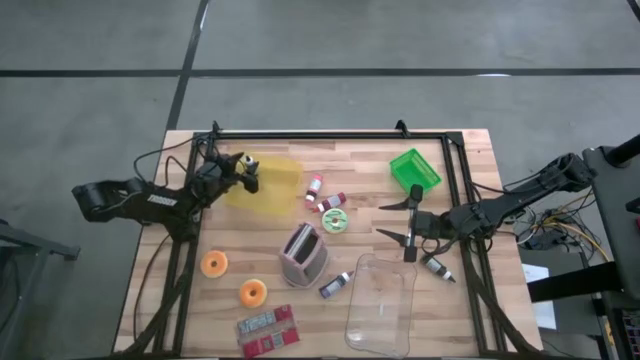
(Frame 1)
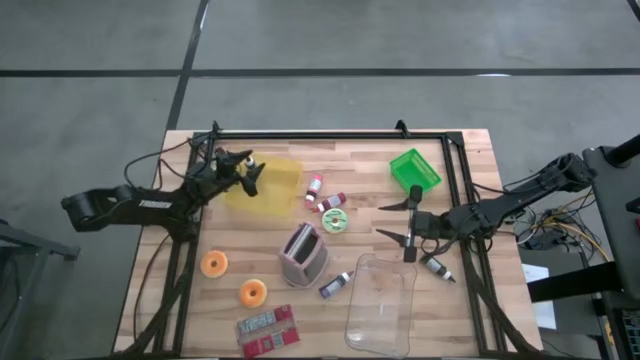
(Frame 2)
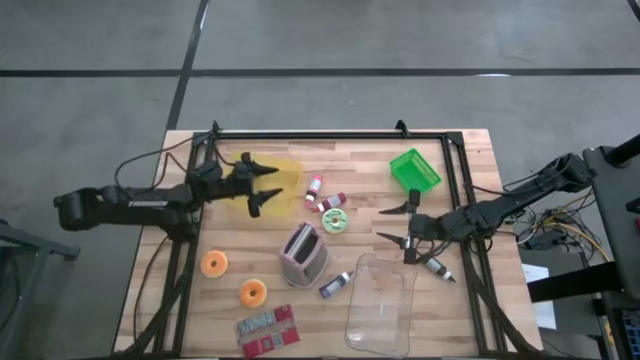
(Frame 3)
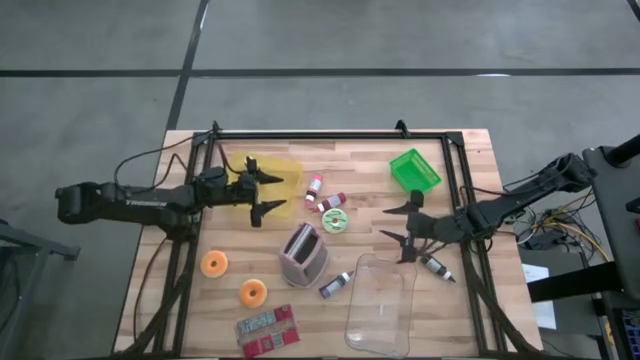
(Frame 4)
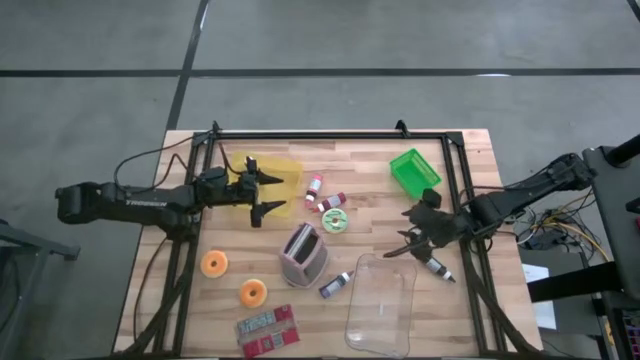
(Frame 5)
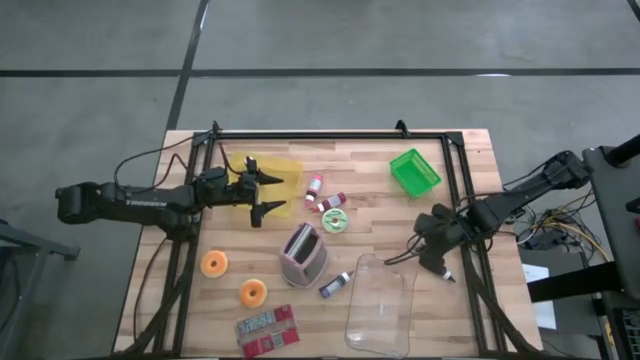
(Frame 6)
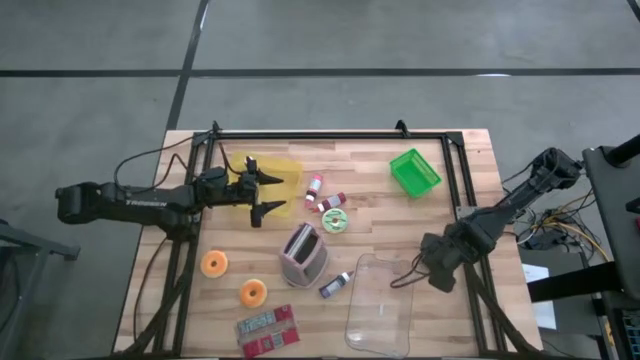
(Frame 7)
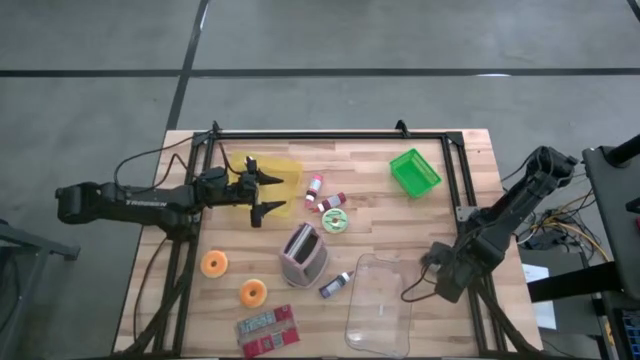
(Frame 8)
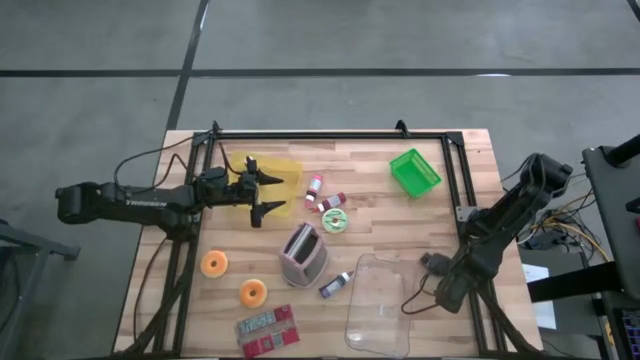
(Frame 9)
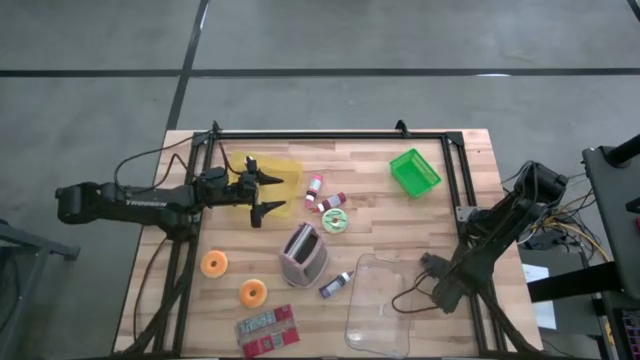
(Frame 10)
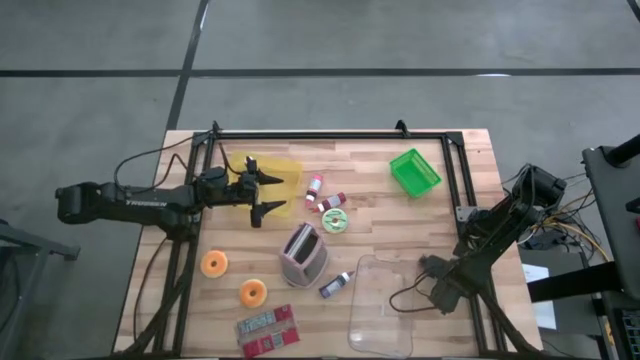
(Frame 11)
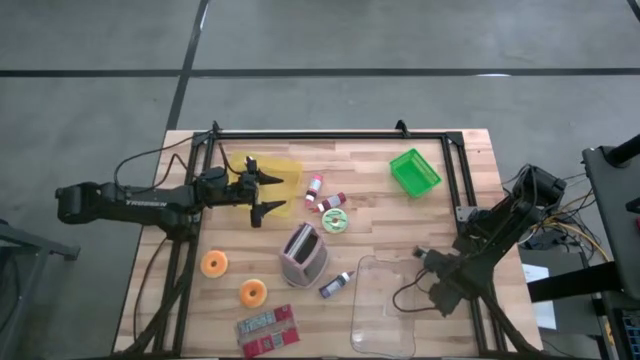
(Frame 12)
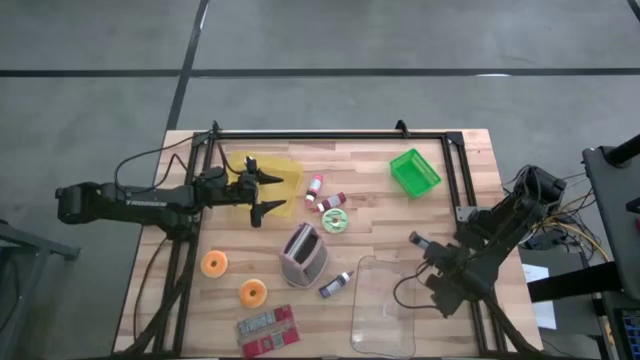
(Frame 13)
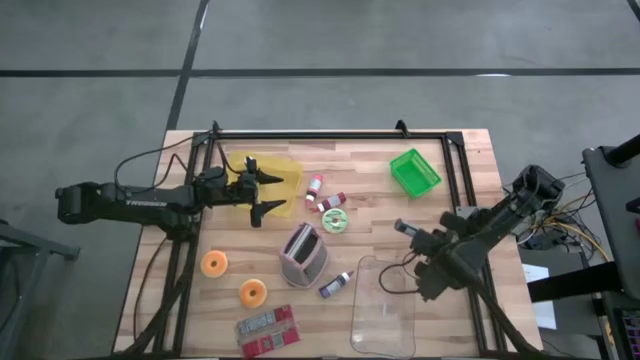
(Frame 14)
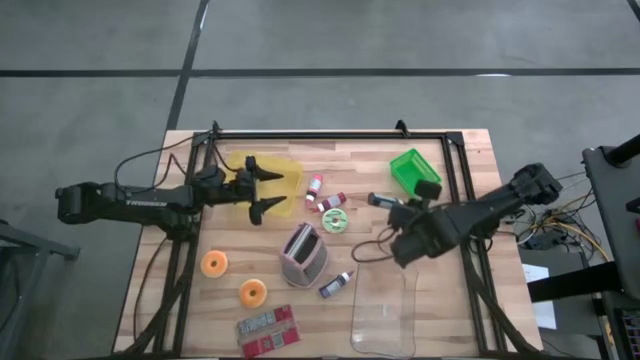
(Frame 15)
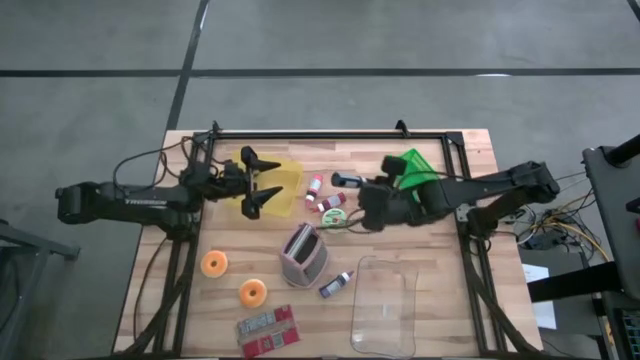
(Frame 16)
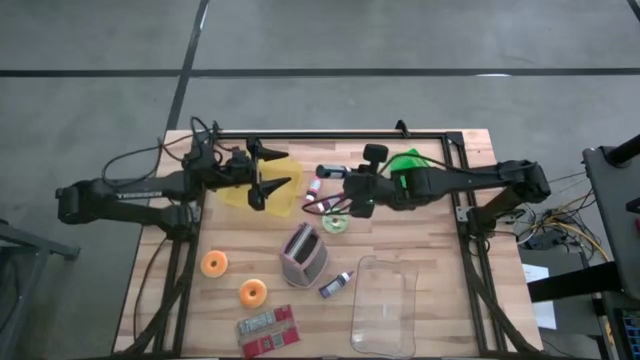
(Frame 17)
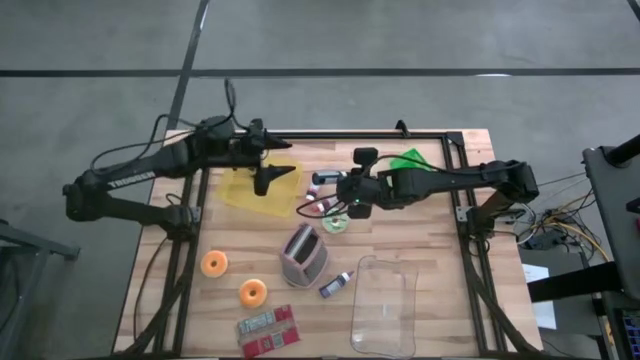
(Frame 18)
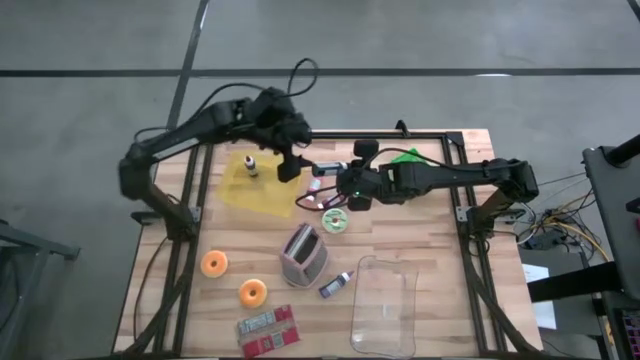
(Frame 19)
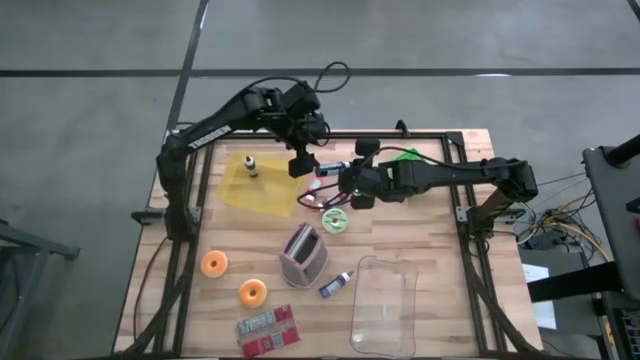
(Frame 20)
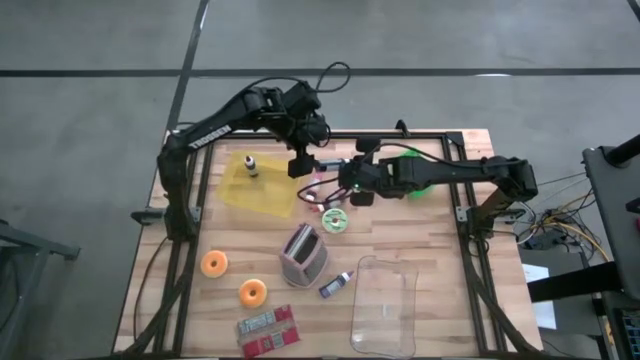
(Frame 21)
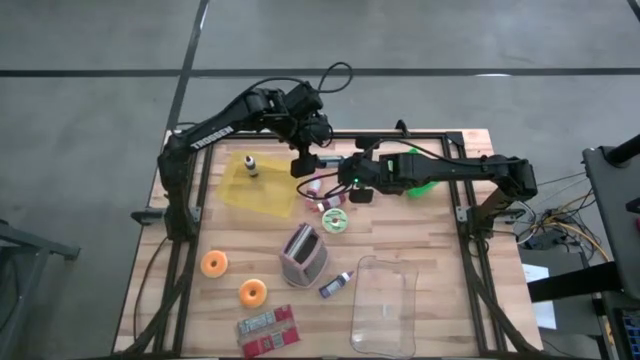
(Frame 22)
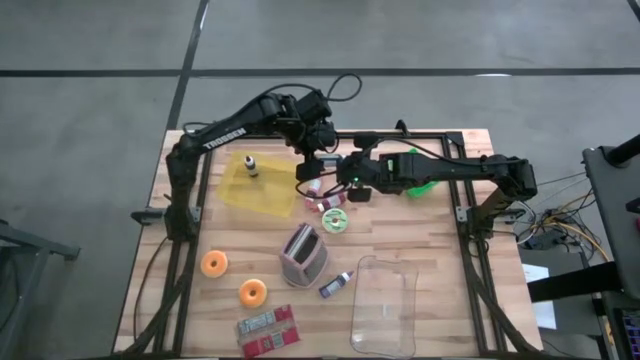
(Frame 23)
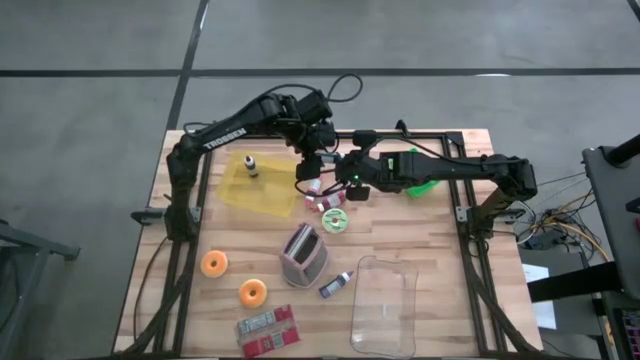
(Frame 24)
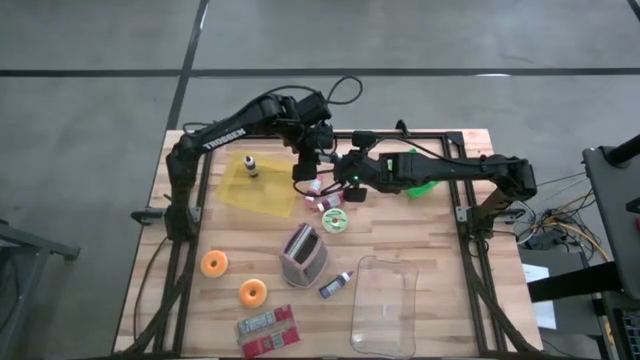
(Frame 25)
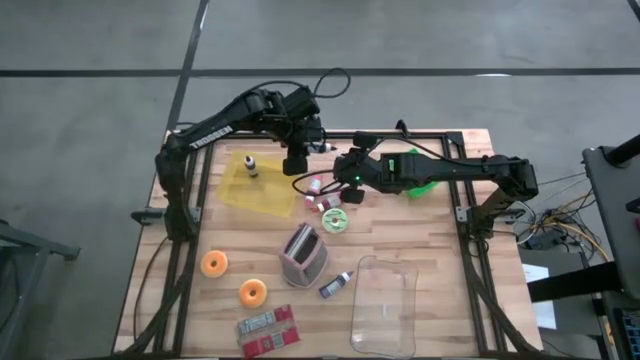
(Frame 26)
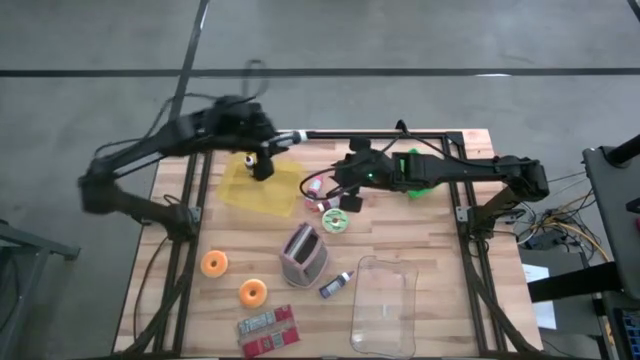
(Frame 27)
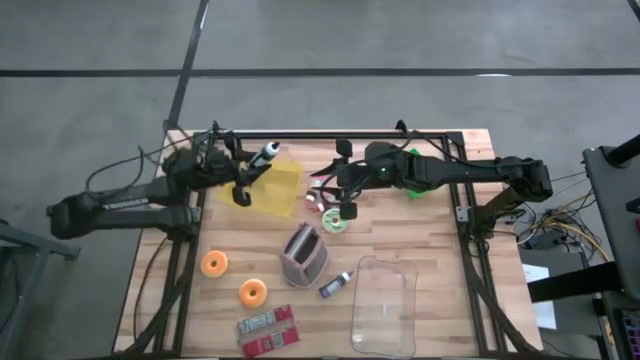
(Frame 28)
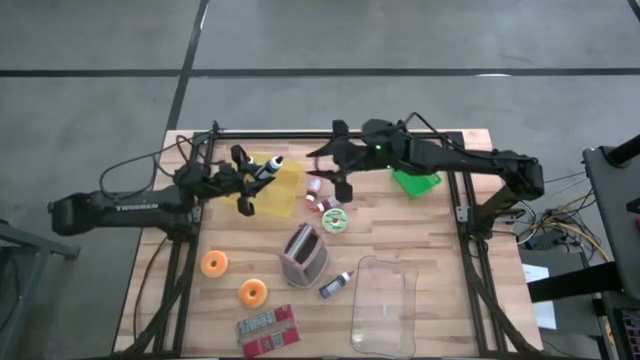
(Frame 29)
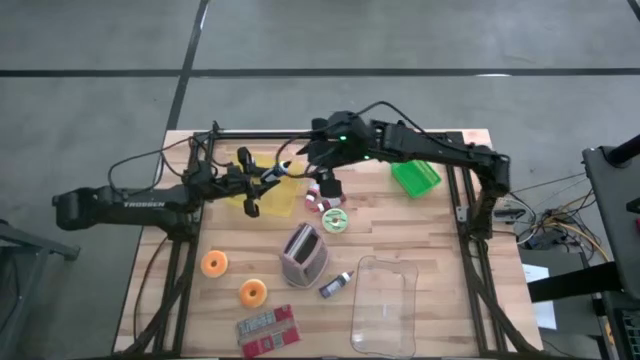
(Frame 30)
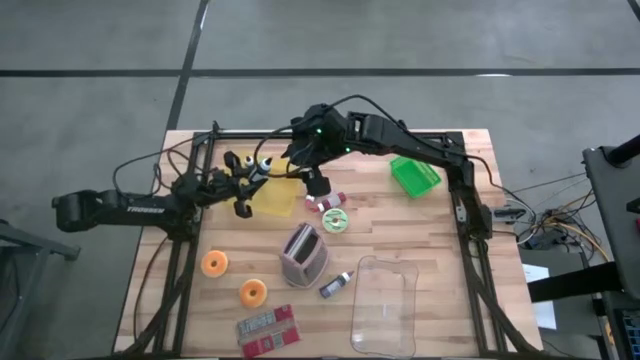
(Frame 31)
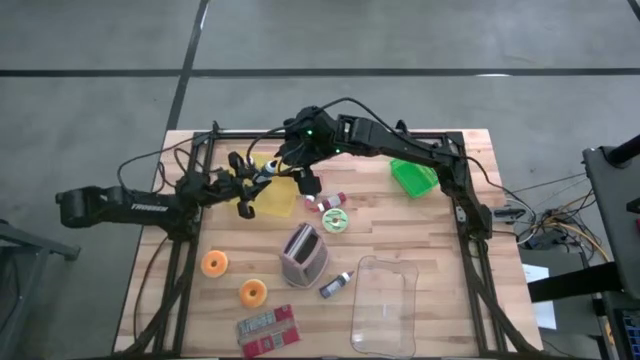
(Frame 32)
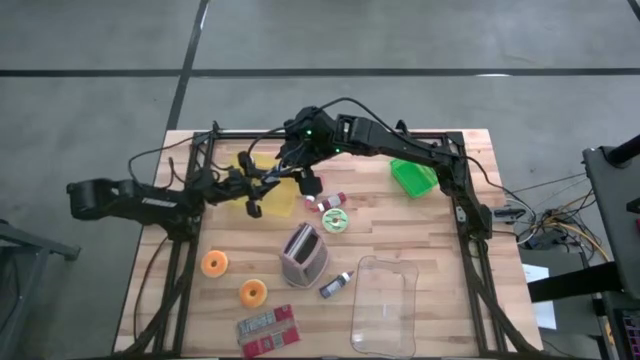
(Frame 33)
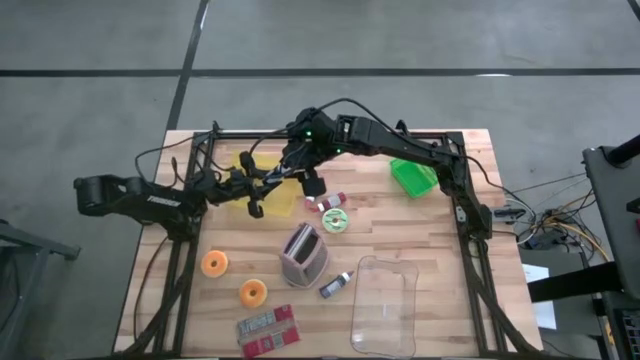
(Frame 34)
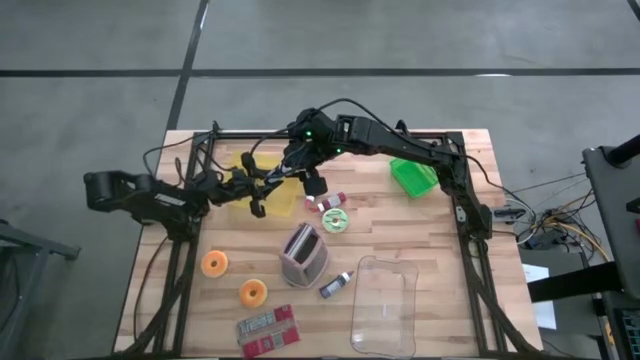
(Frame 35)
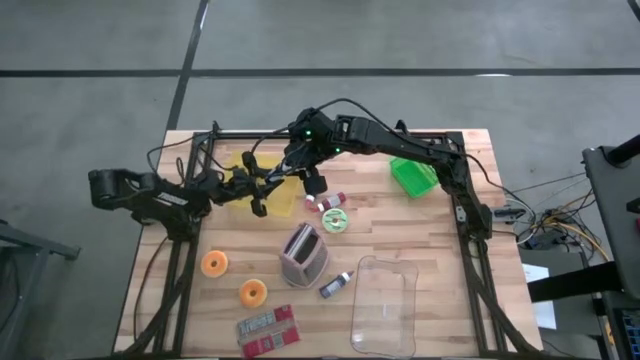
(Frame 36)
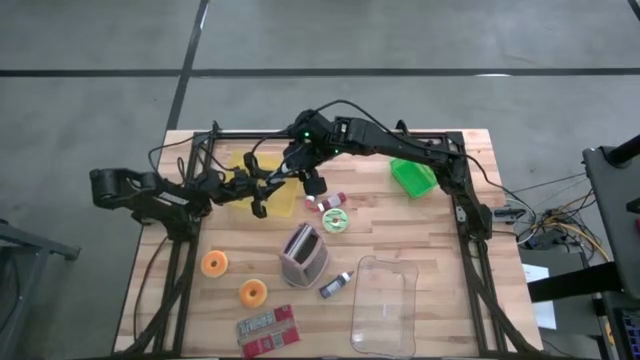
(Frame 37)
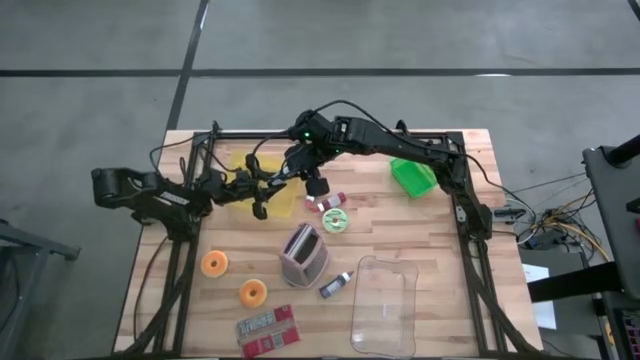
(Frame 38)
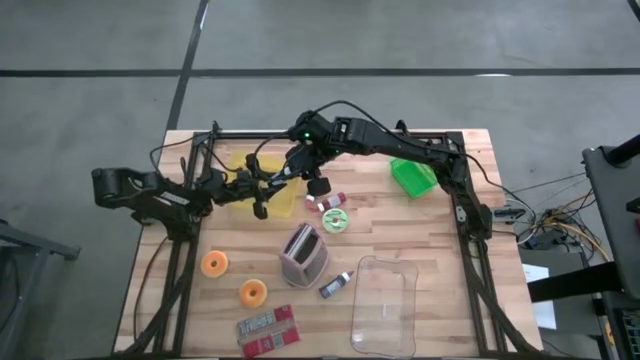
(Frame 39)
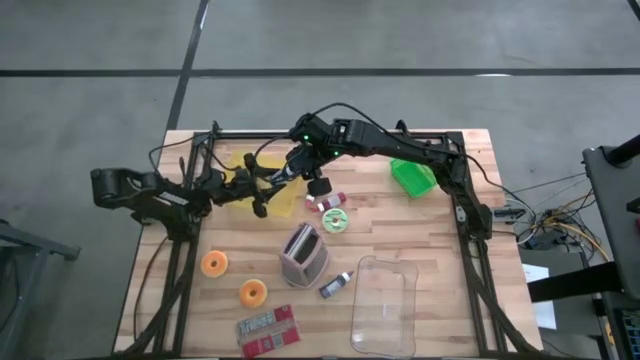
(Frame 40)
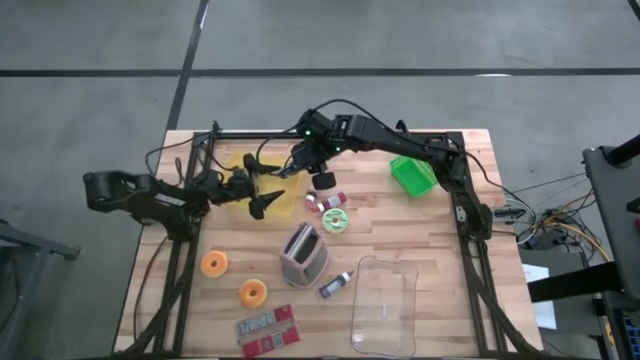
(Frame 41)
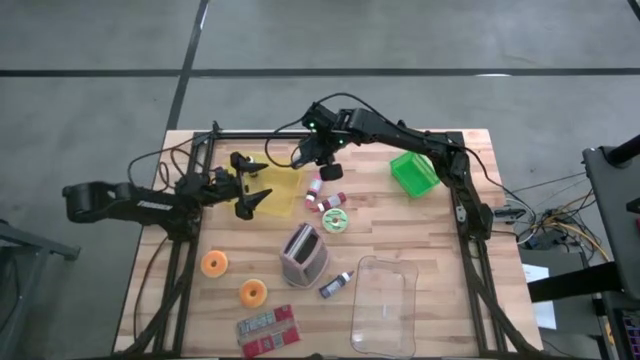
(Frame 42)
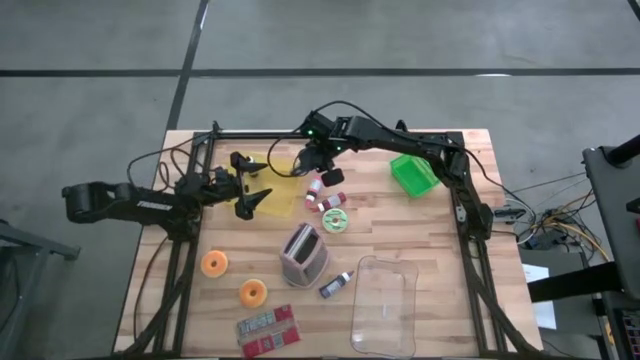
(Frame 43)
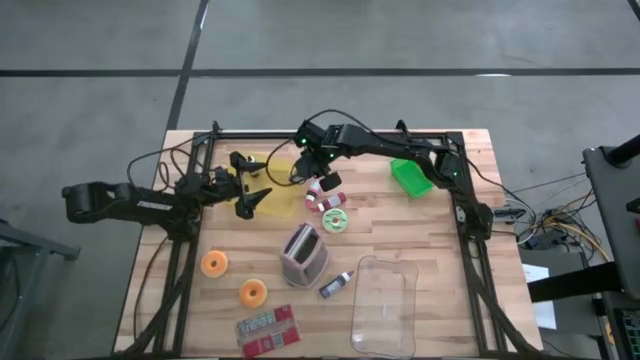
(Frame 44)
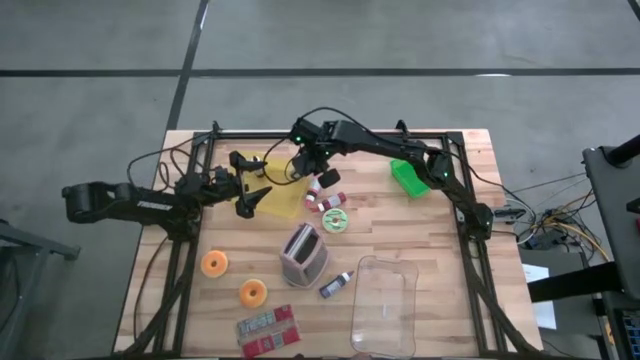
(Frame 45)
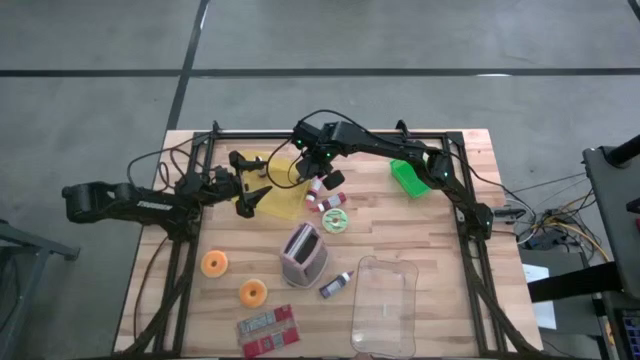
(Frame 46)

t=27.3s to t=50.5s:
Task: Pick & Place Food Item
Put the black food coloring into the yellow bin
